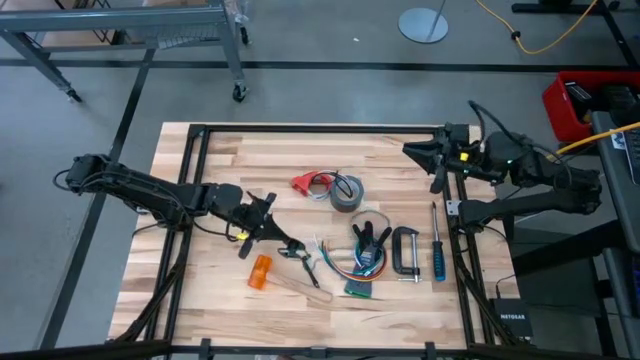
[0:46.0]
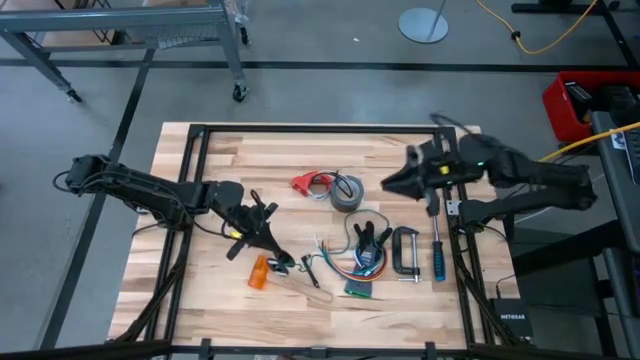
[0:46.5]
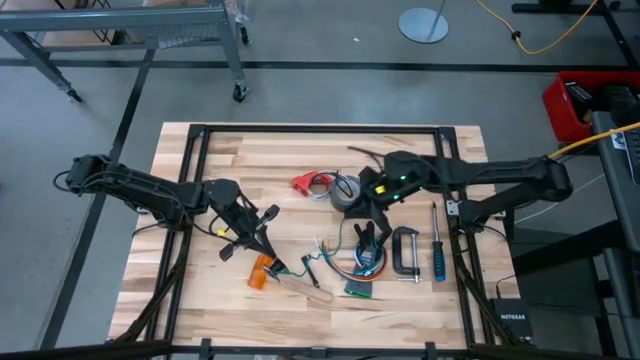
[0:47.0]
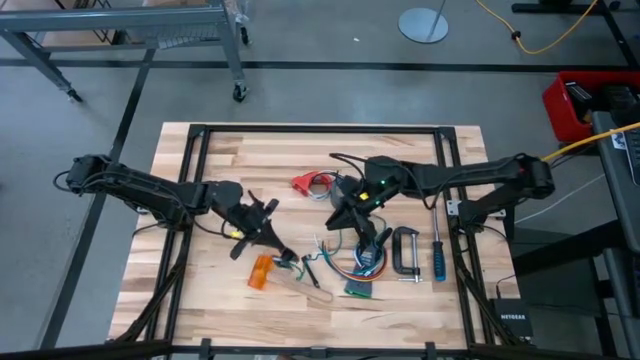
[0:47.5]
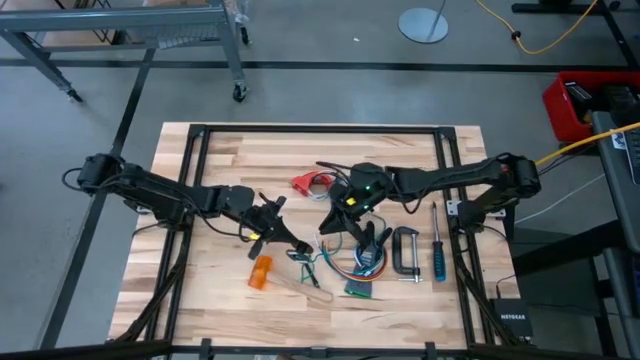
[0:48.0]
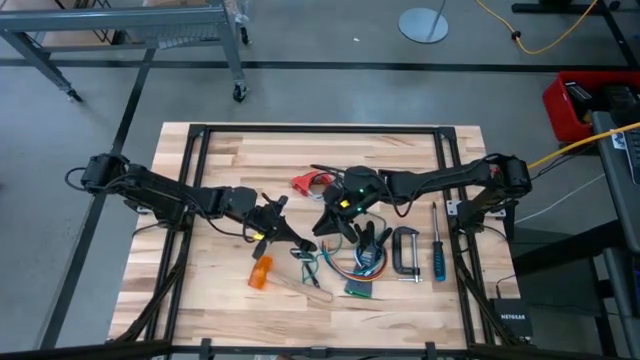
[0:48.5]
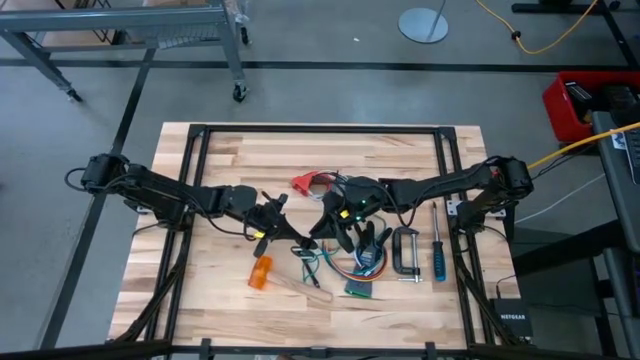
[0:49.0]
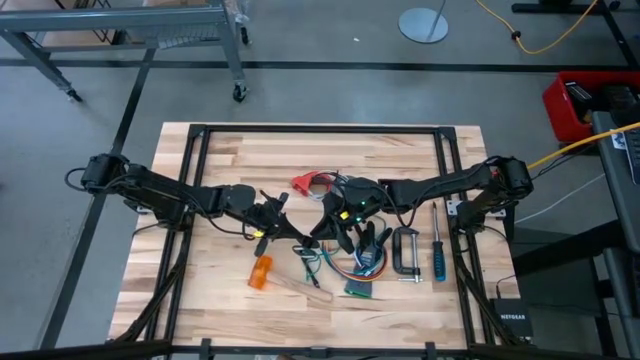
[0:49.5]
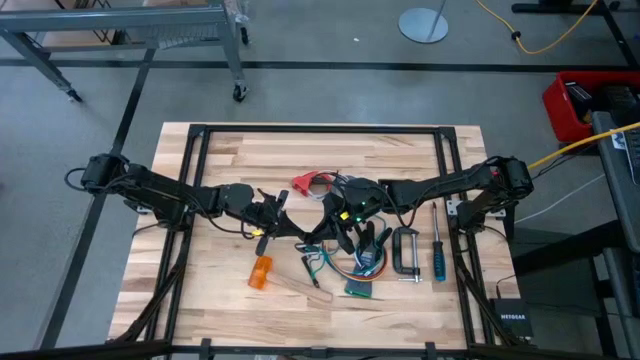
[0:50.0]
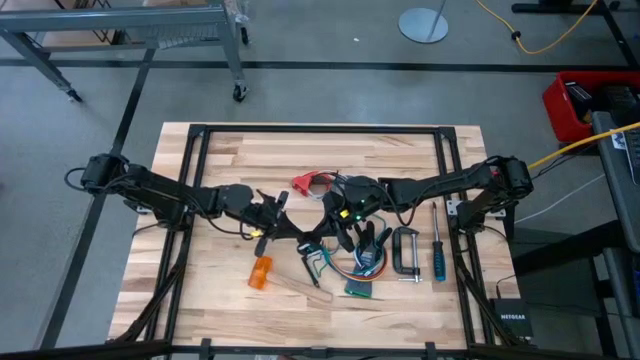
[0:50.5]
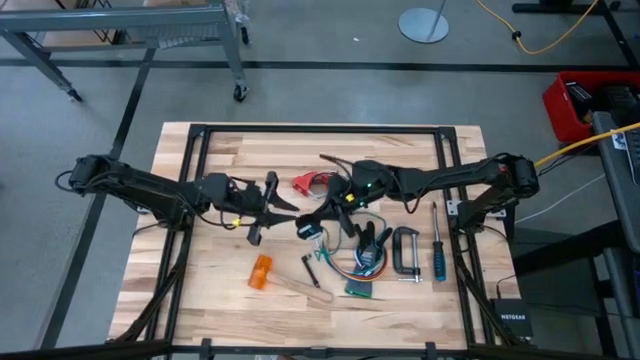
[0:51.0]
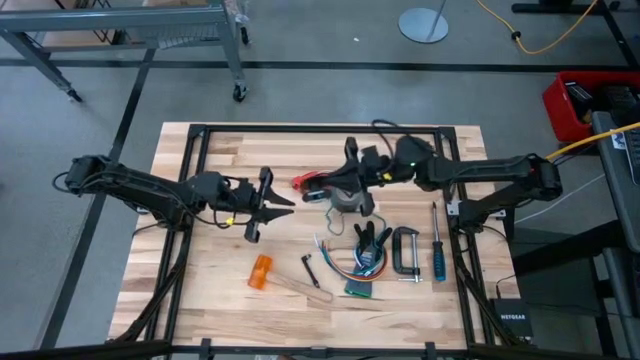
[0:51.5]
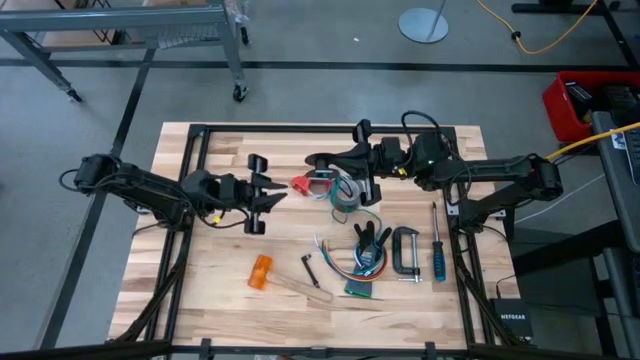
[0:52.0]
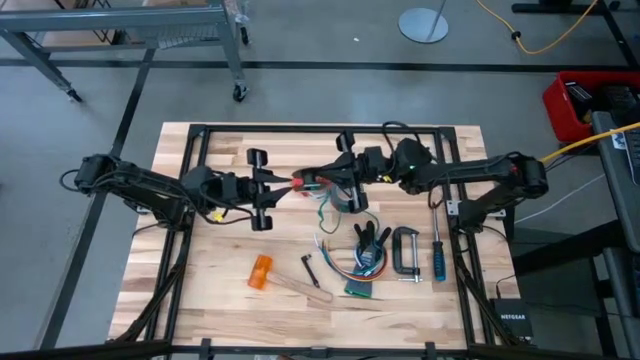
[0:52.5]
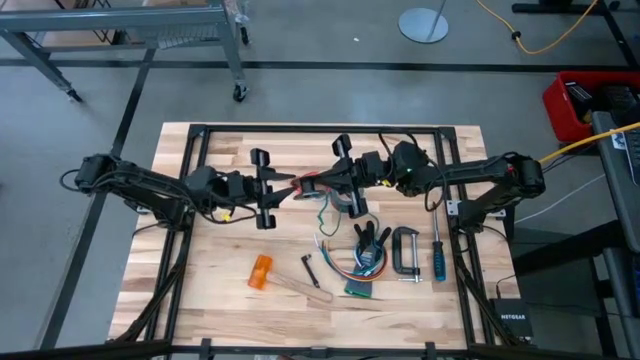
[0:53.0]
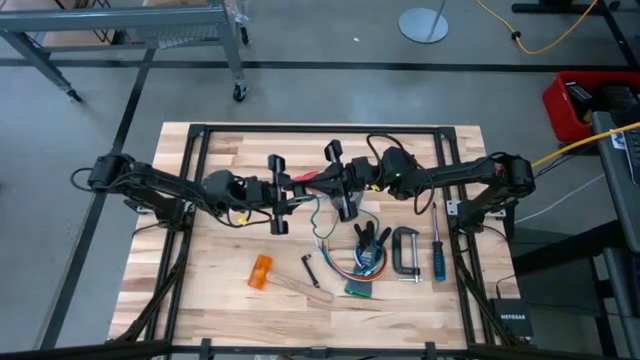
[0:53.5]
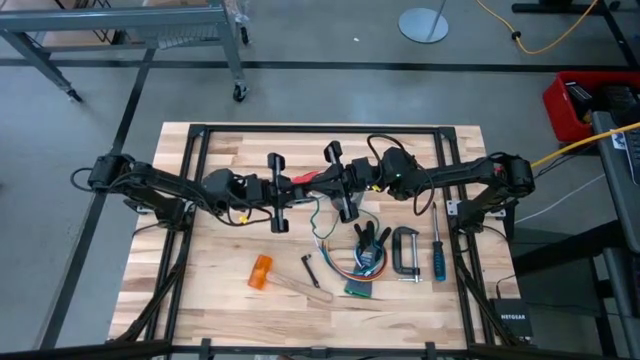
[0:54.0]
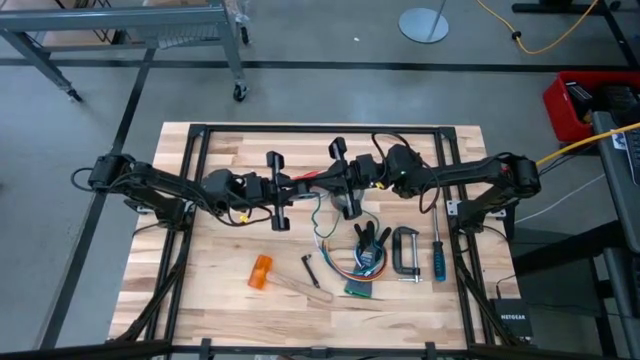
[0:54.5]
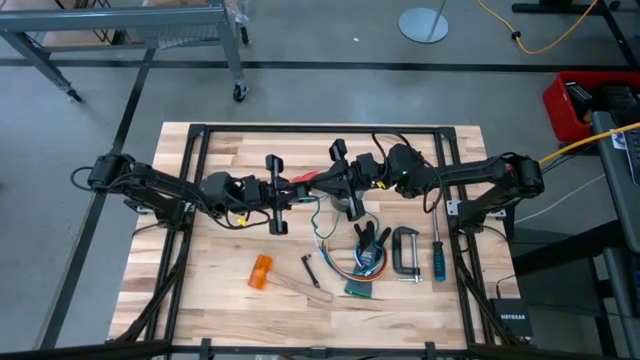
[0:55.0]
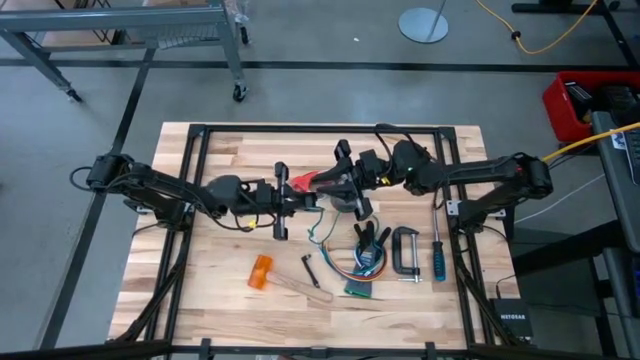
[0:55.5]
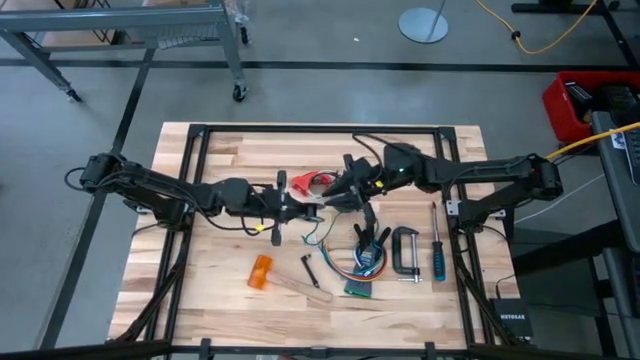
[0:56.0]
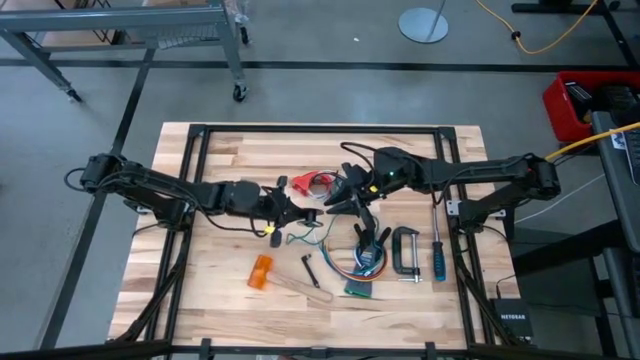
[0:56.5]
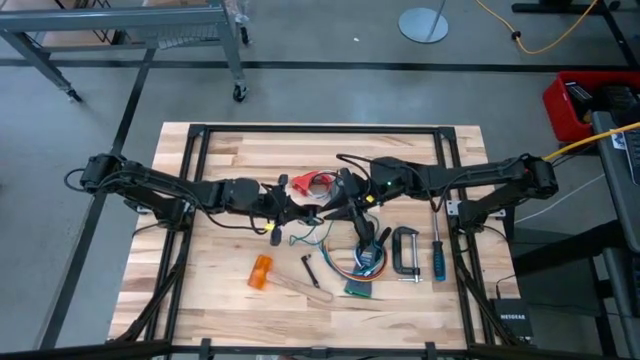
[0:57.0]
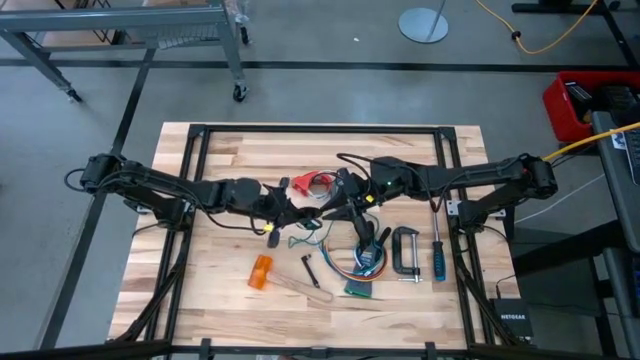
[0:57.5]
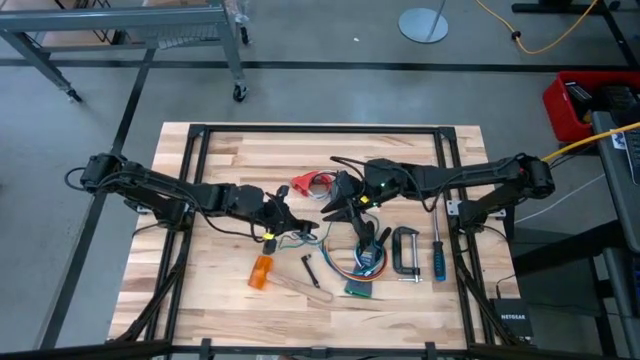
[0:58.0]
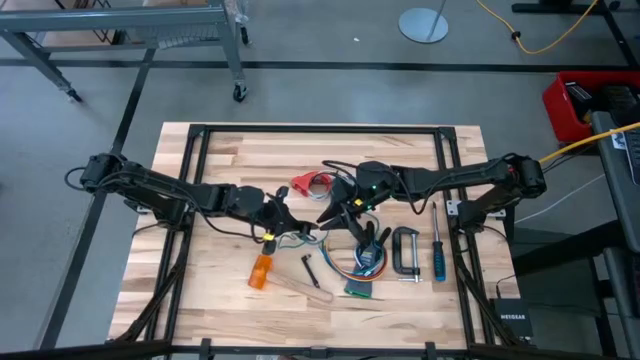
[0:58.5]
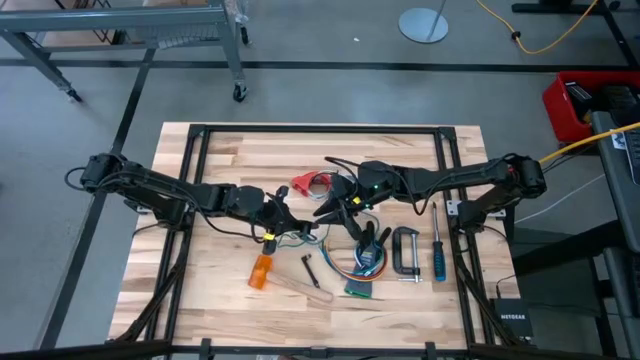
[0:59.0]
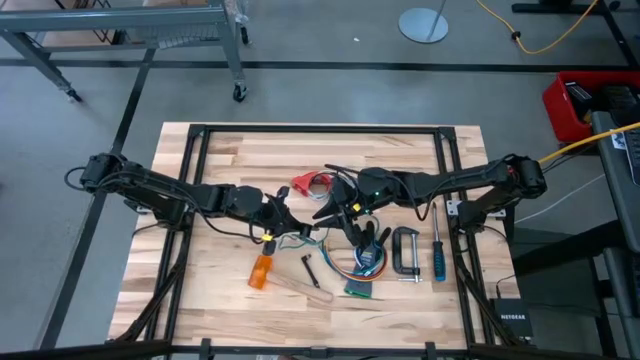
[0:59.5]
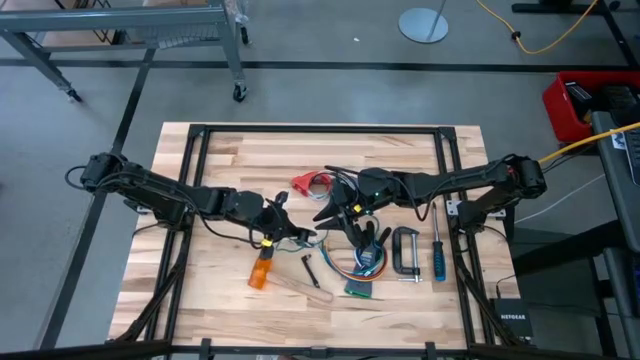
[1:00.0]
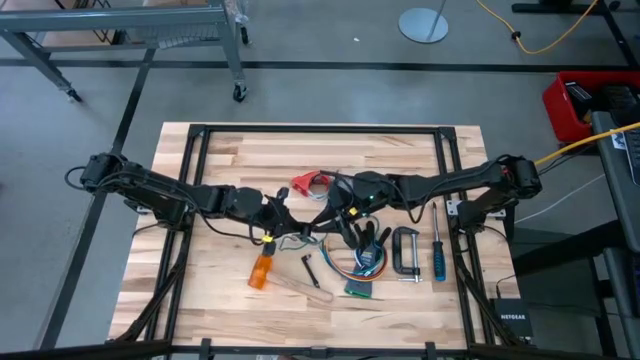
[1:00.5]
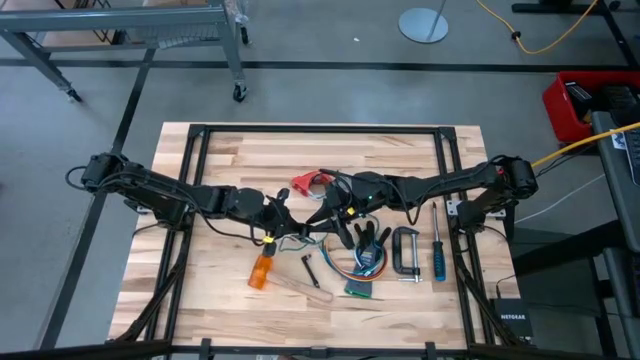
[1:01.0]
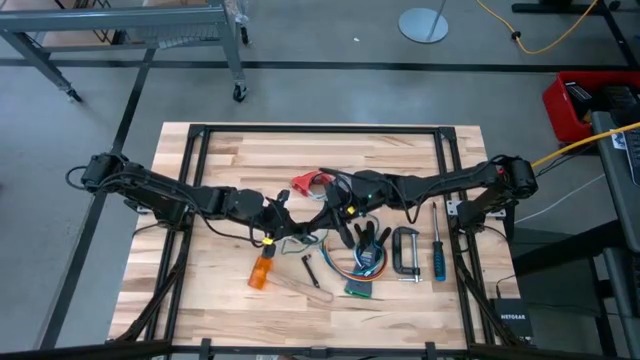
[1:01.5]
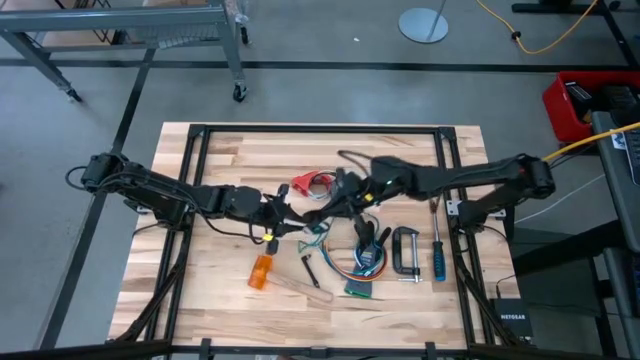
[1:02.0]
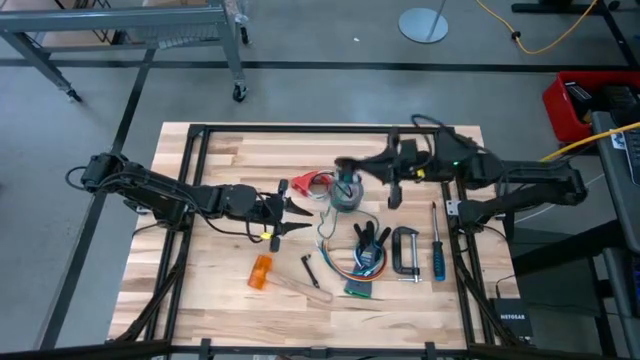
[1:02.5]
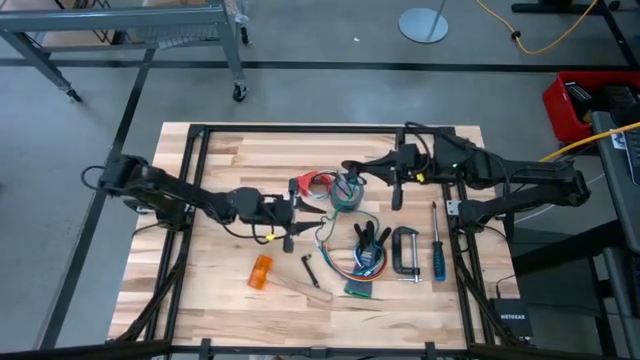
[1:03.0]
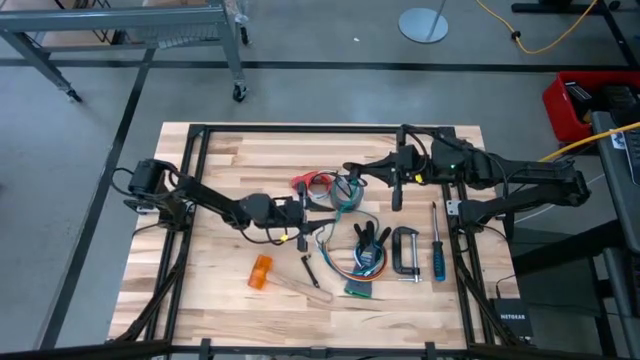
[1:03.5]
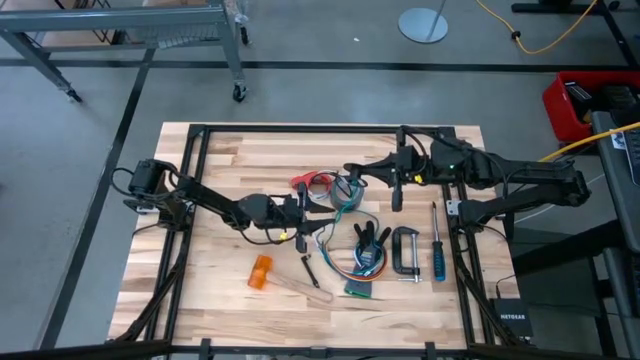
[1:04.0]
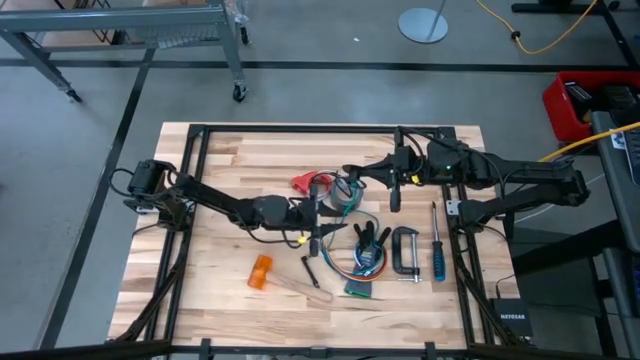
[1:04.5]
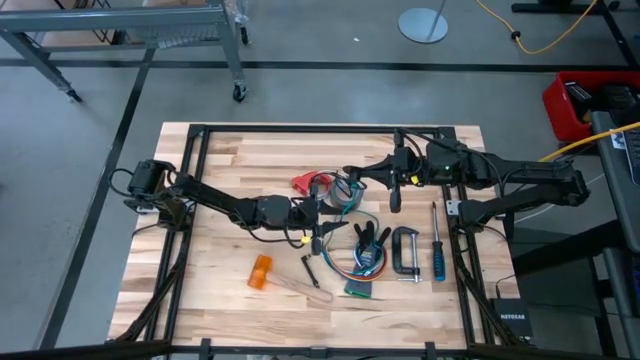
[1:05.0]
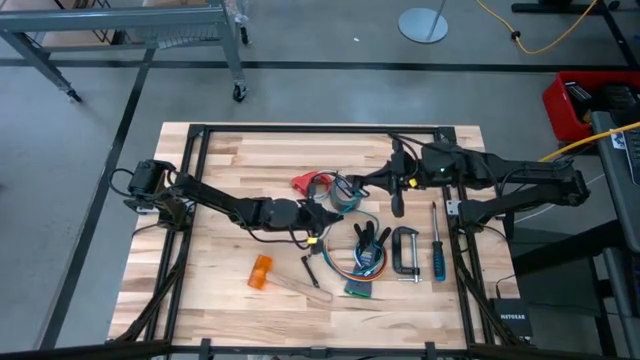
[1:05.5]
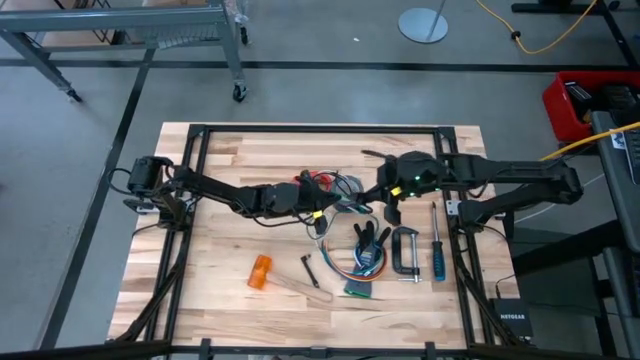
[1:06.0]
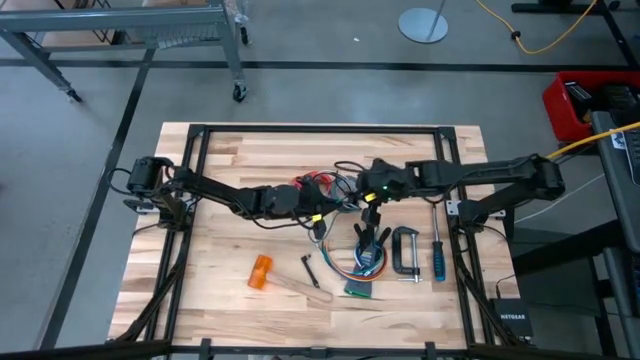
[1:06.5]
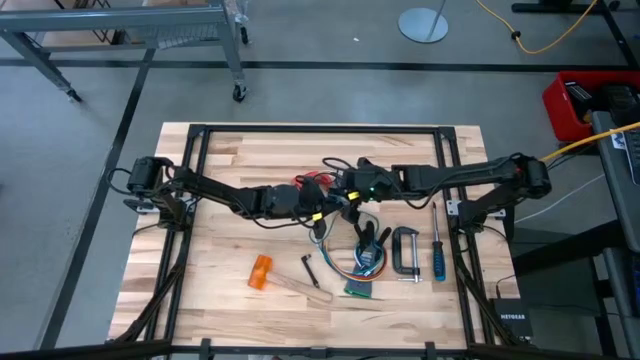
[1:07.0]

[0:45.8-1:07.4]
Task: Coil cords
Coil the blue wire onto the spool
